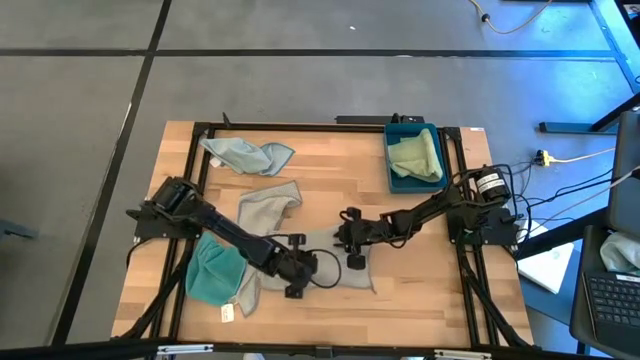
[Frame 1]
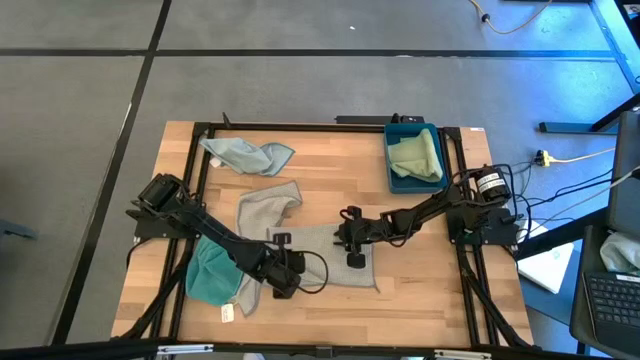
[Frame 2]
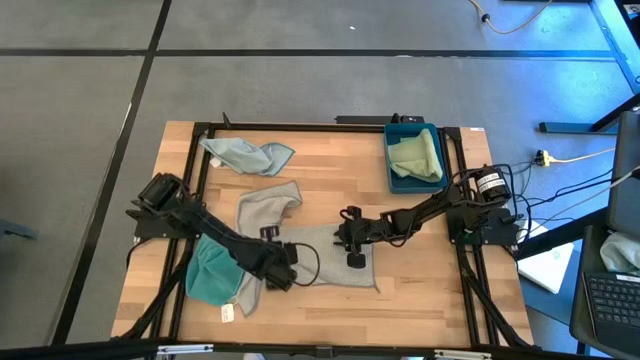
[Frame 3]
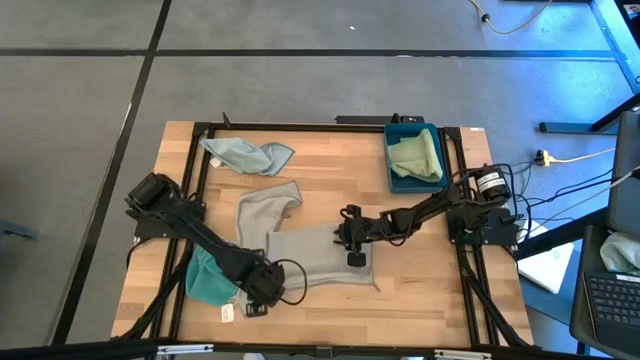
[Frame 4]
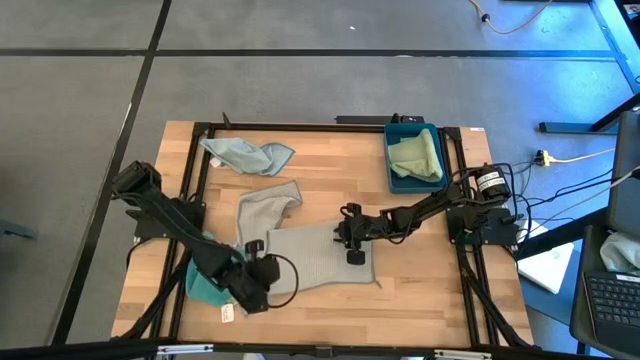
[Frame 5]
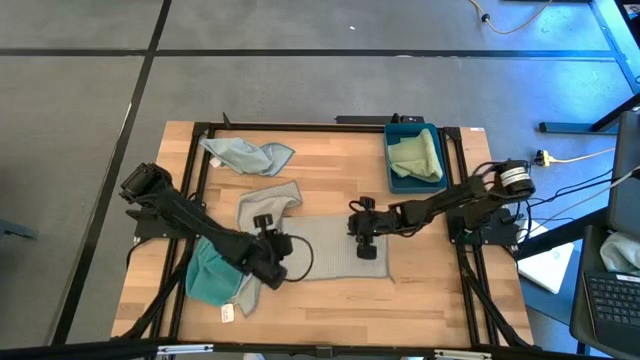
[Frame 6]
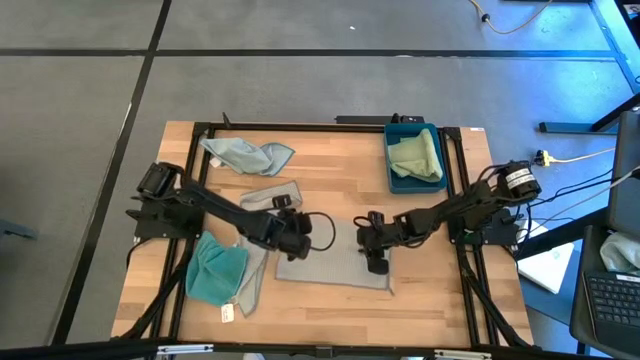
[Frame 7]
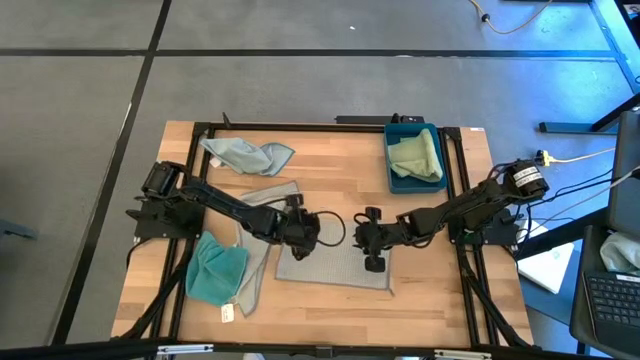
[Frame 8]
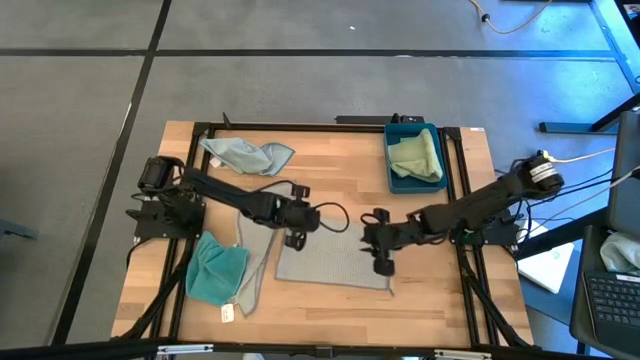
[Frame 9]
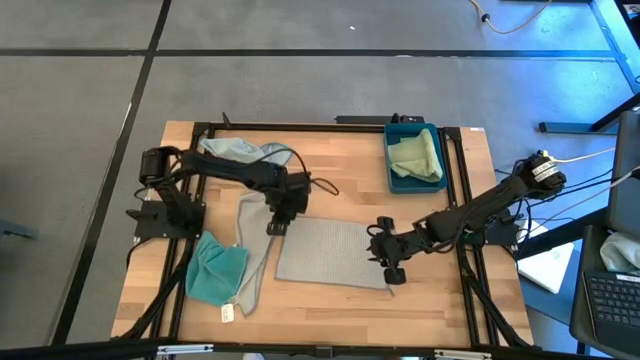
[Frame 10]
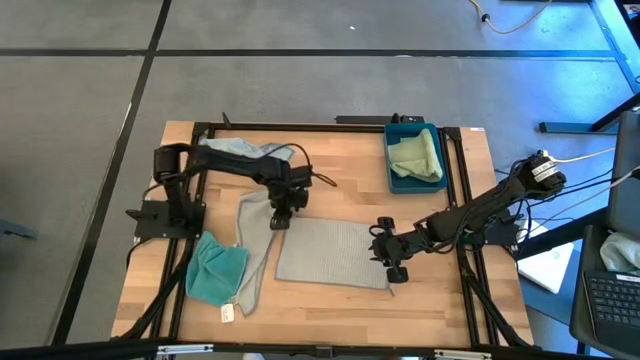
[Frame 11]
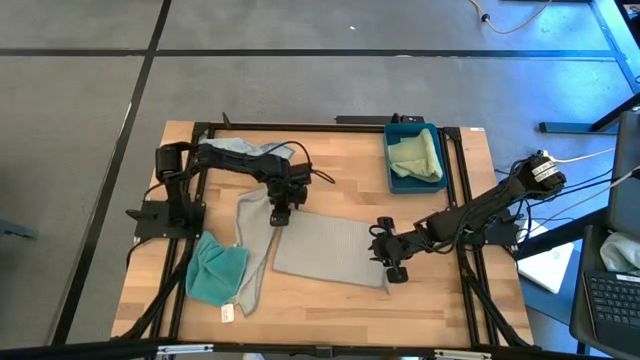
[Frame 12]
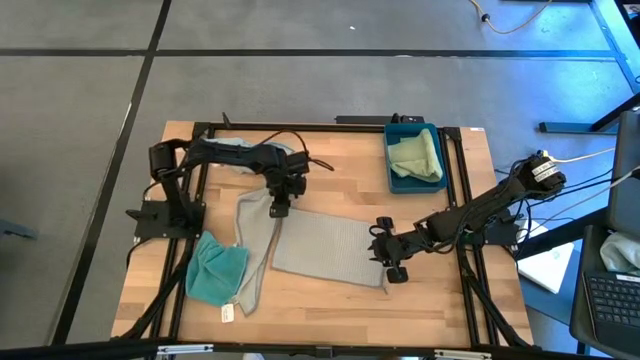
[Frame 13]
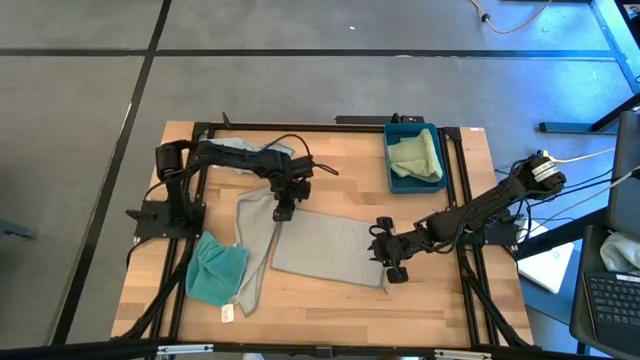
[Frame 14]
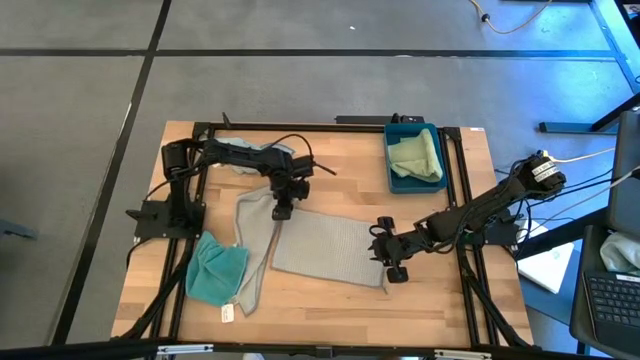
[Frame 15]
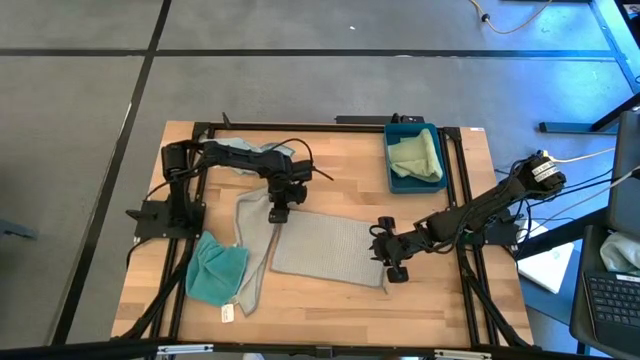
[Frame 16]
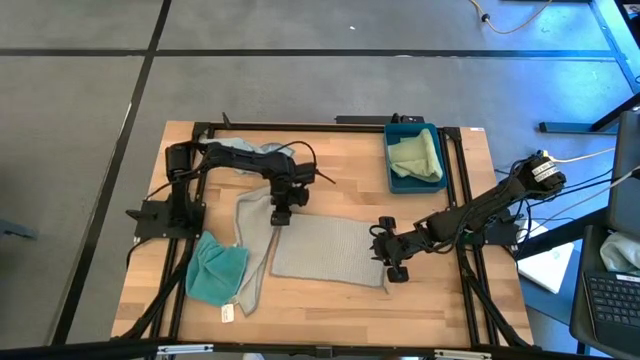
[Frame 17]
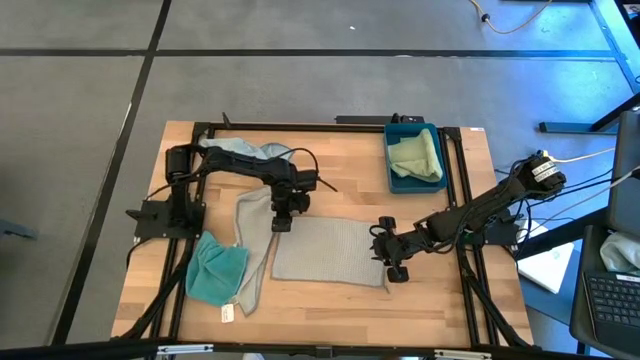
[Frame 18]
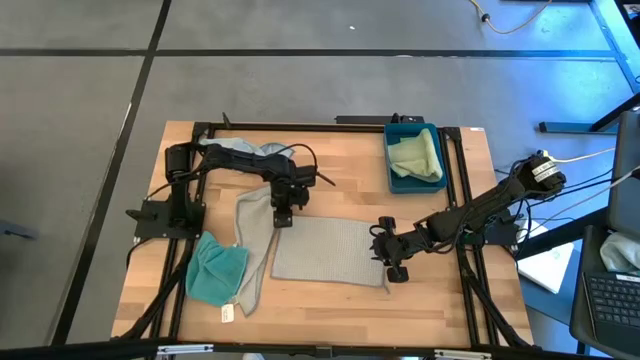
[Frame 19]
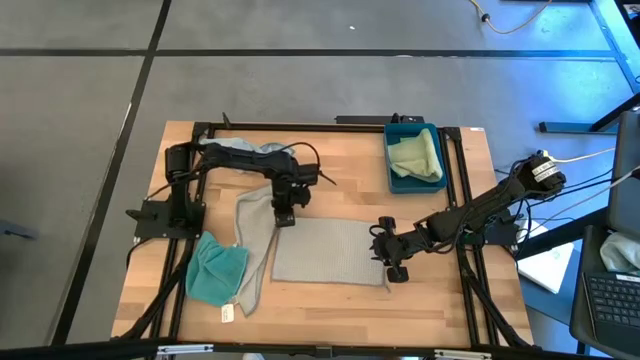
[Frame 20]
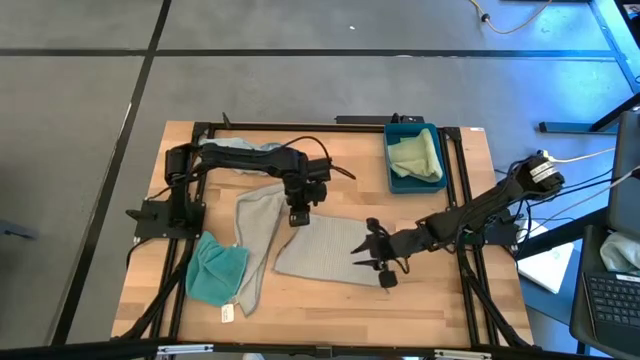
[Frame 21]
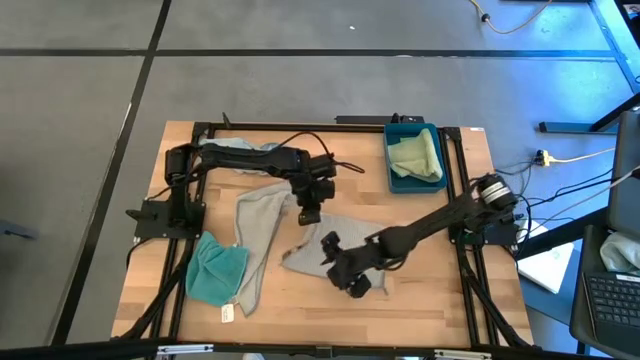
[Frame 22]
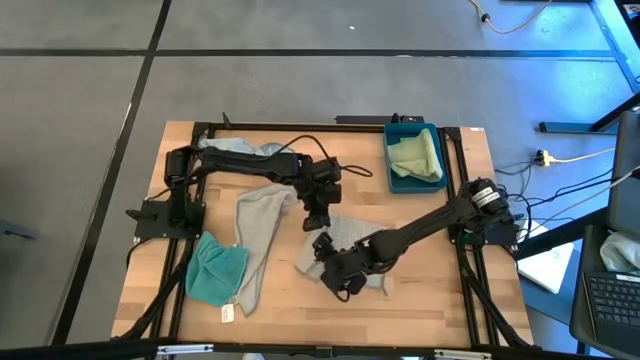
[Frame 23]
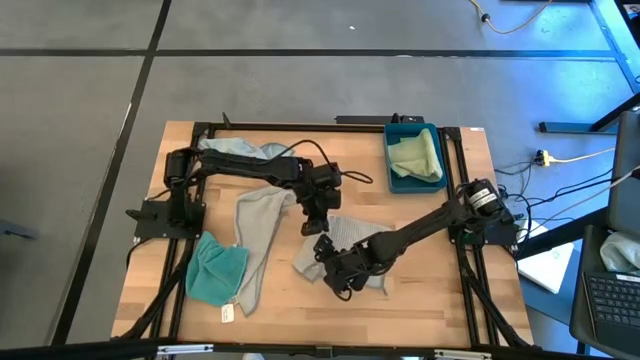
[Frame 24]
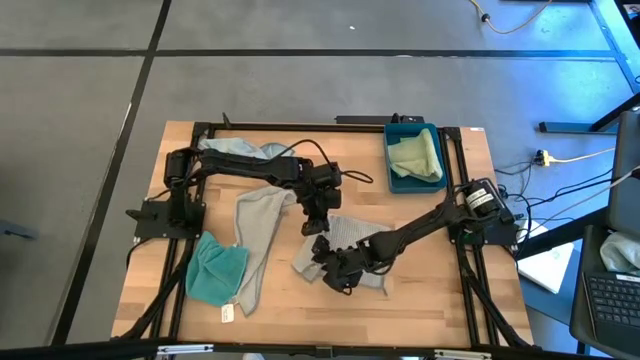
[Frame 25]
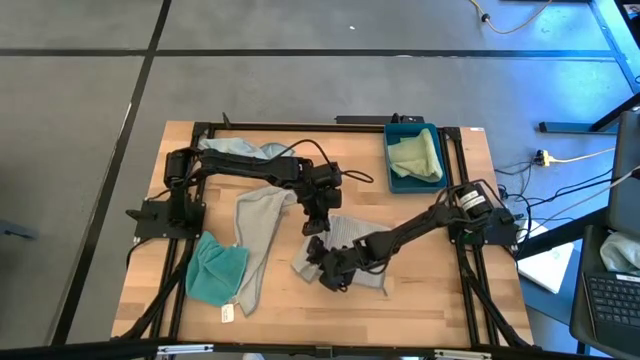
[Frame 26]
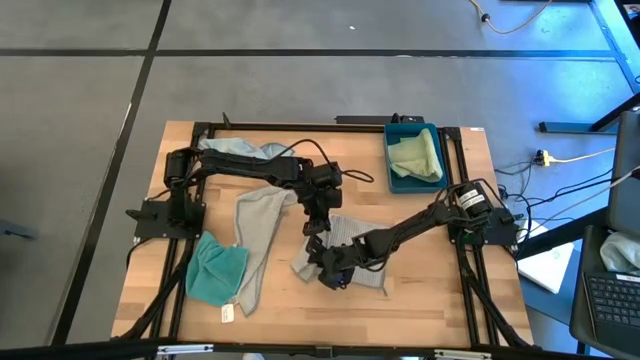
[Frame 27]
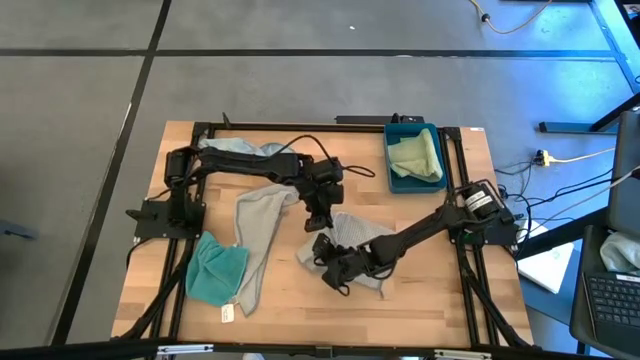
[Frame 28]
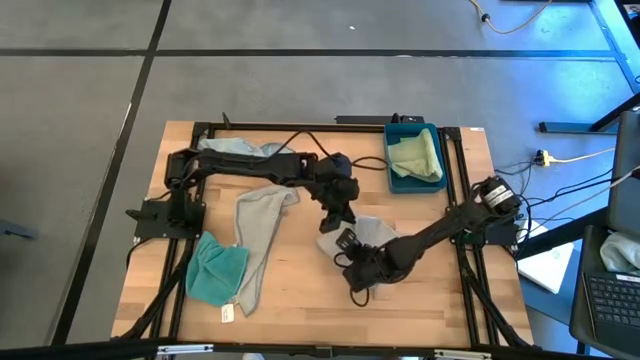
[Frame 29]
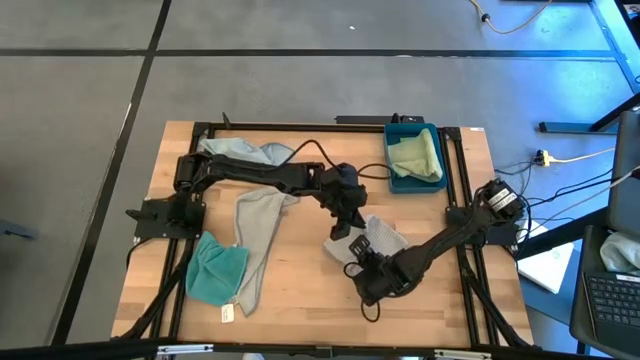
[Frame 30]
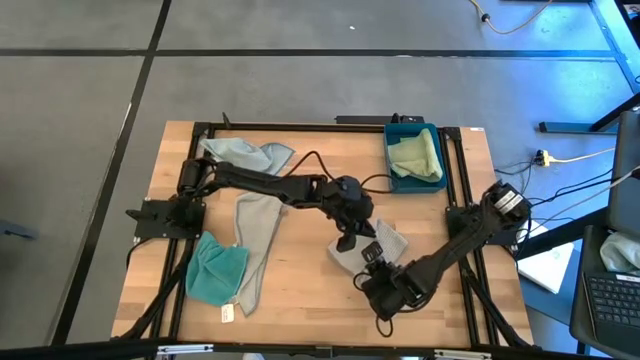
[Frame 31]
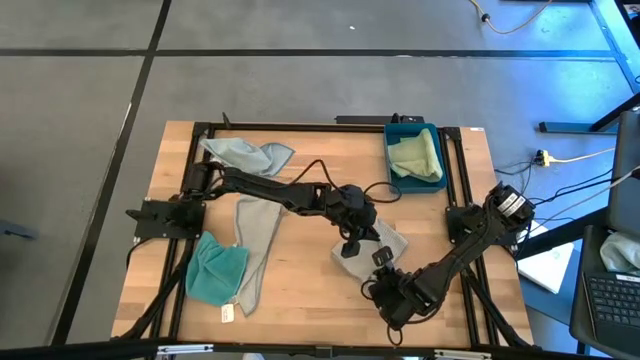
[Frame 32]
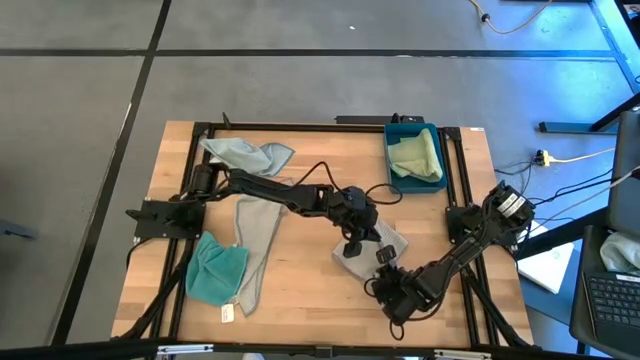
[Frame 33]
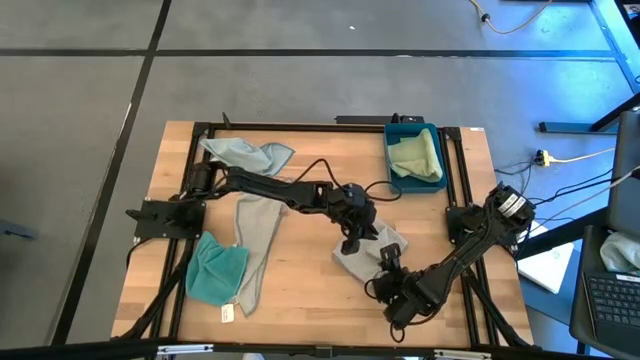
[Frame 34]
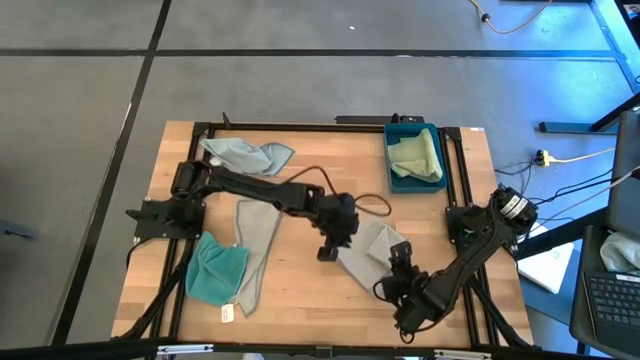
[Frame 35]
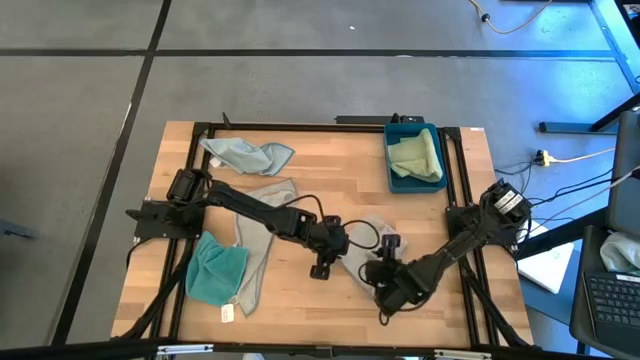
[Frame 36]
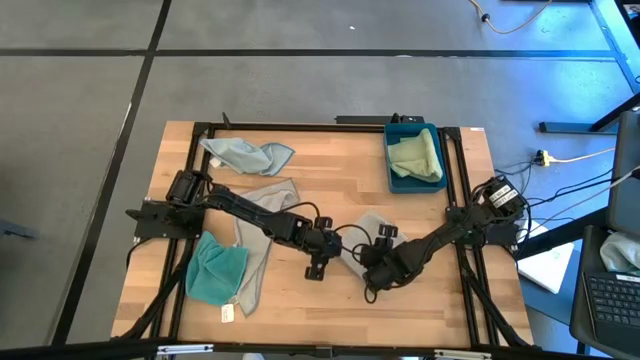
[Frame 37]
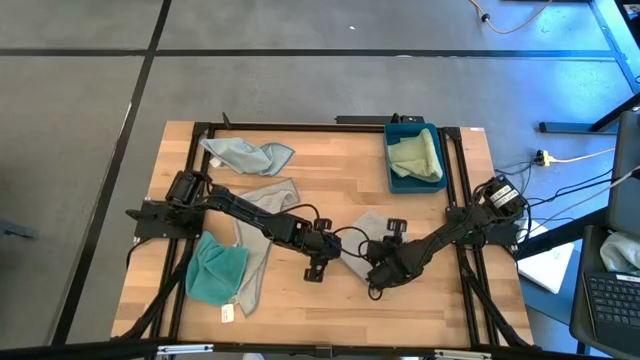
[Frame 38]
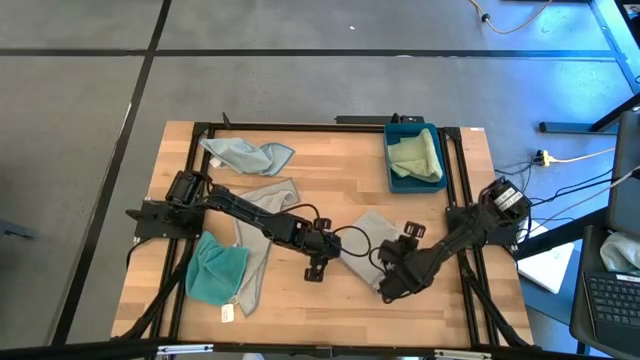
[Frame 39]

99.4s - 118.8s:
Task: Fold microfiber towels
Fold the top grey microfiber cloth
